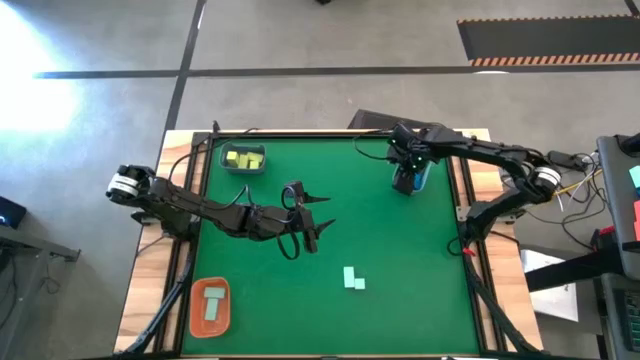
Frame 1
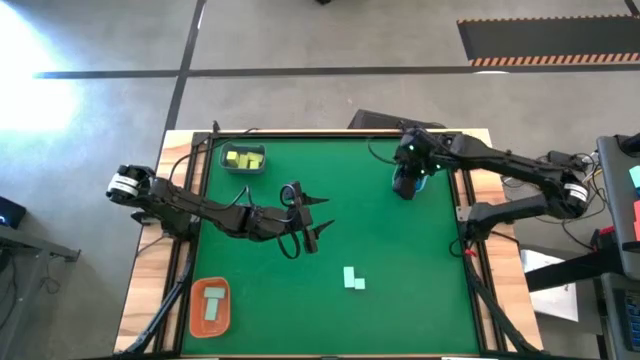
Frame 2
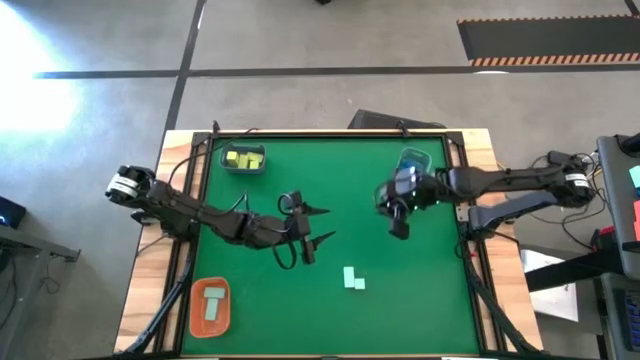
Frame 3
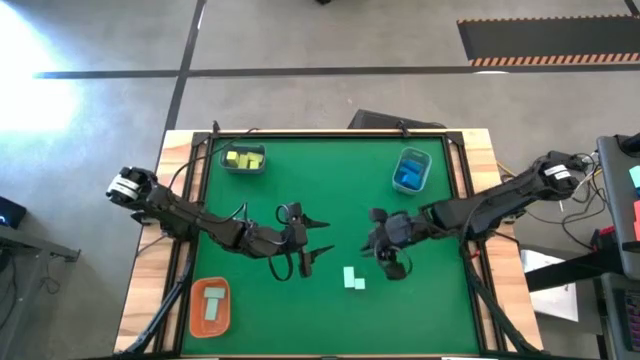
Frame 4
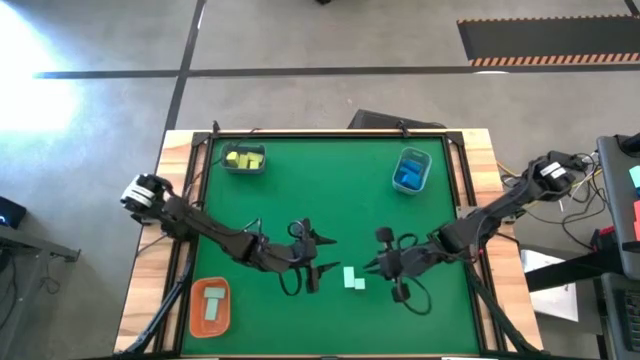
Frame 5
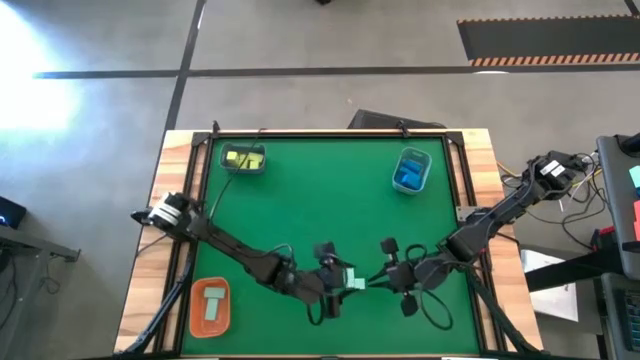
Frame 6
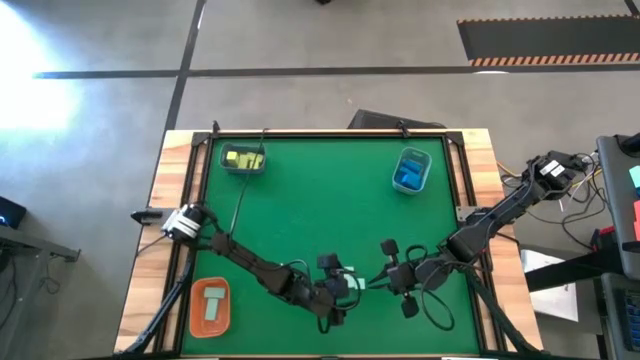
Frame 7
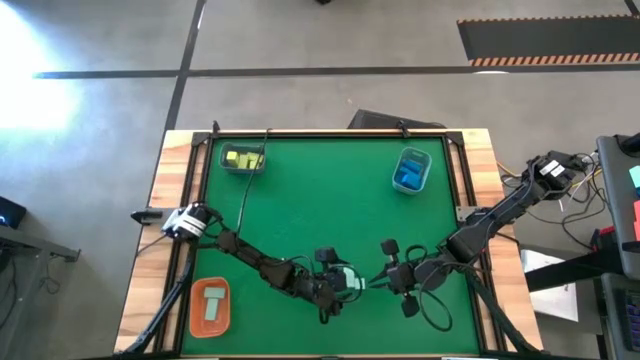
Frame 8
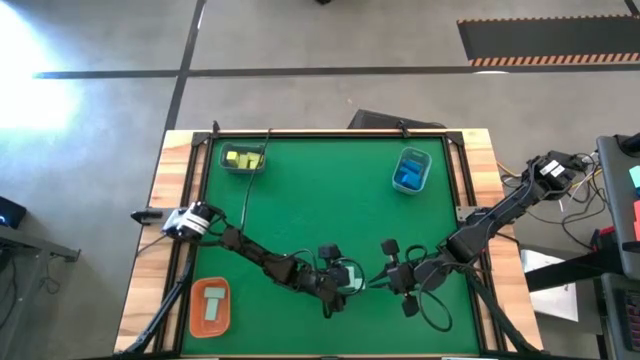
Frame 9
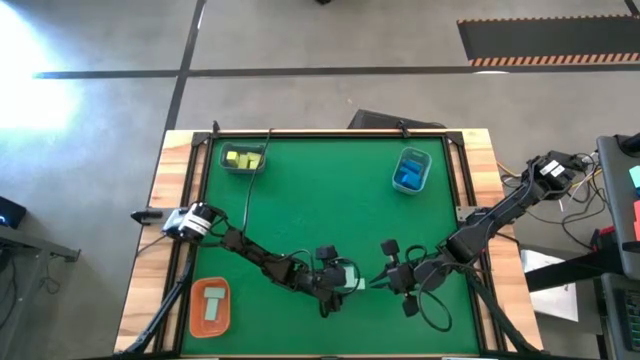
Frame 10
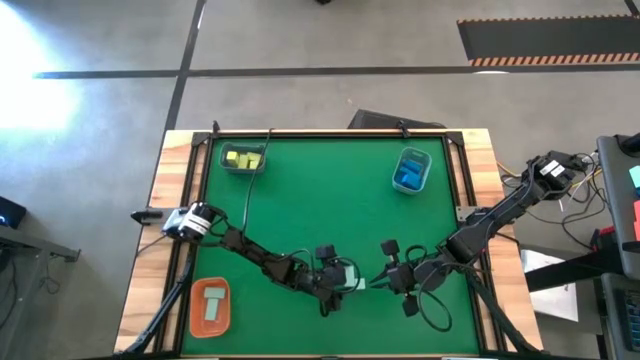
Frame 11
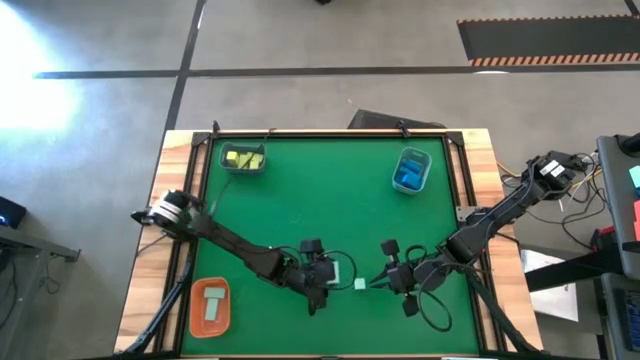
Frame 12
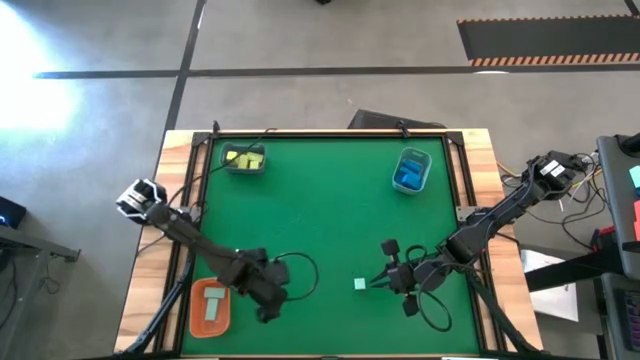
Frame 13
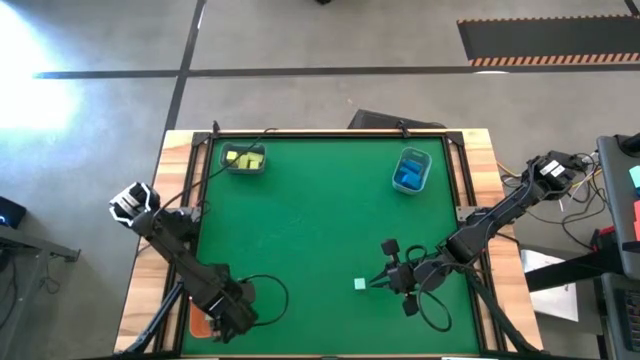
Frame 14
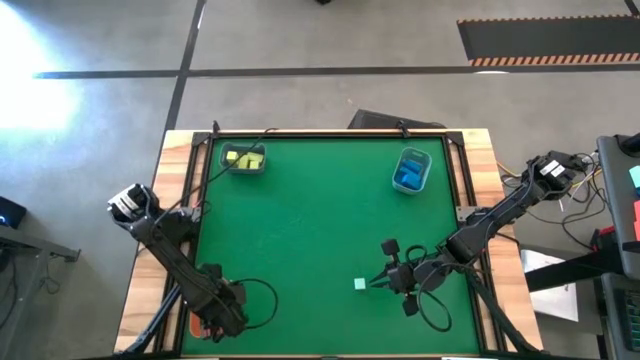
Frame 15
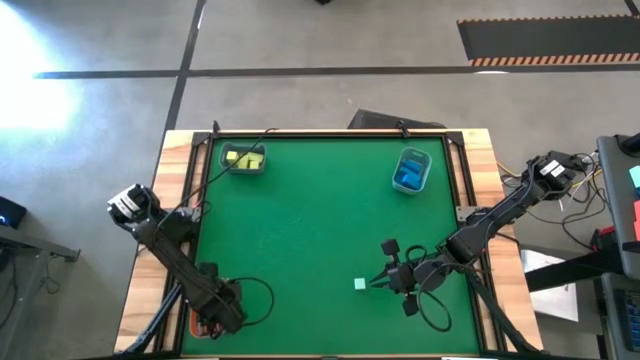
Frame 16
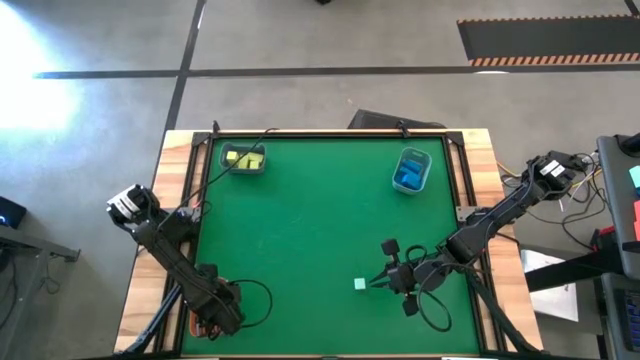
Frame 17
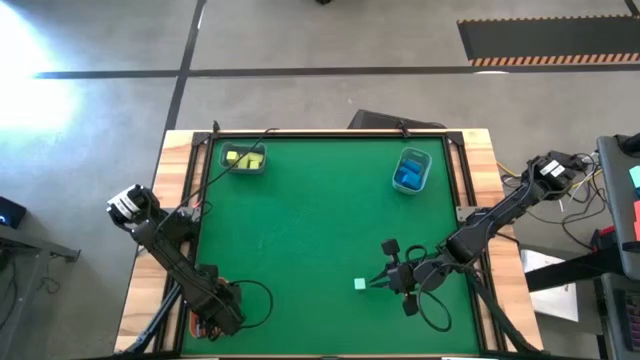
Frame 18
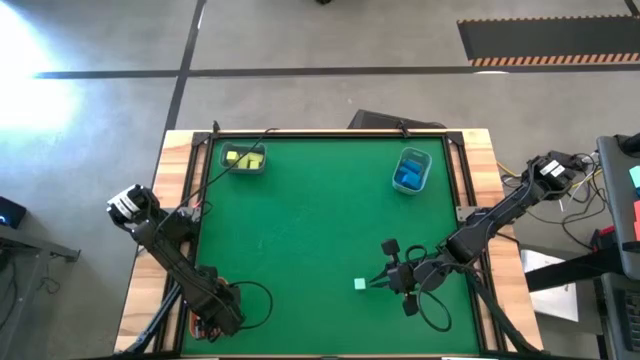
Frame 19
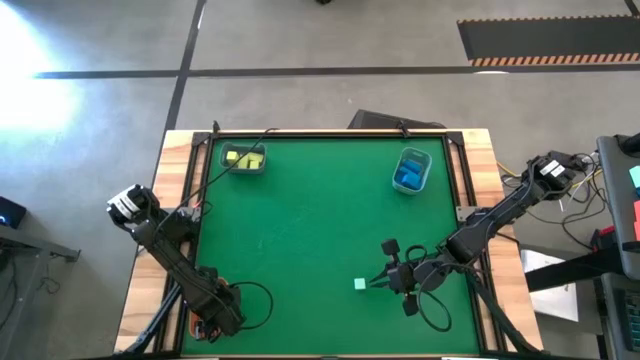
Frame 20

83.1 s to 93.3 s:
Task: Sort & place blocks by color
Put the light blue block into the orange bin

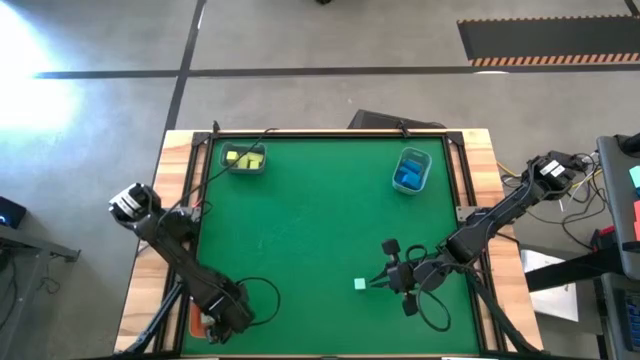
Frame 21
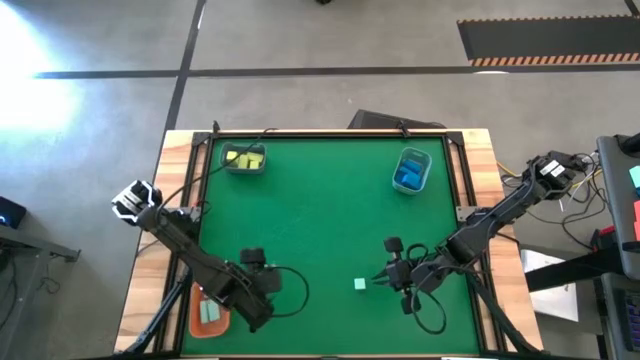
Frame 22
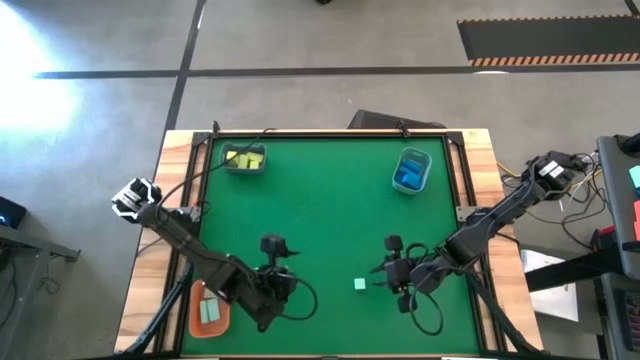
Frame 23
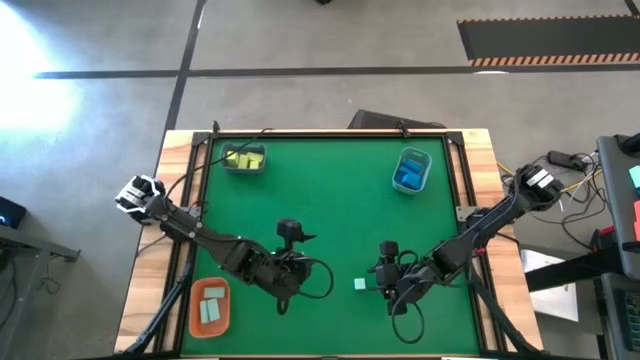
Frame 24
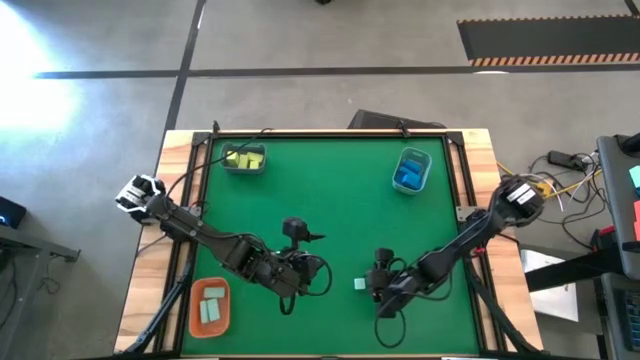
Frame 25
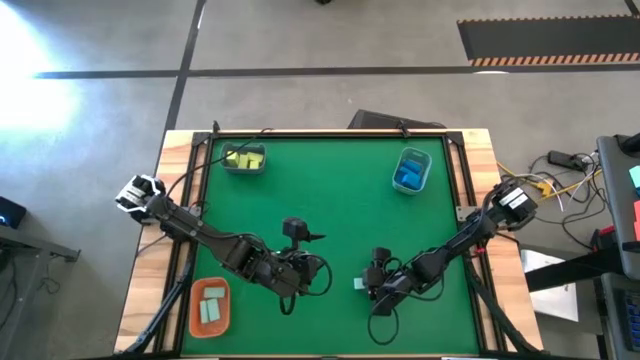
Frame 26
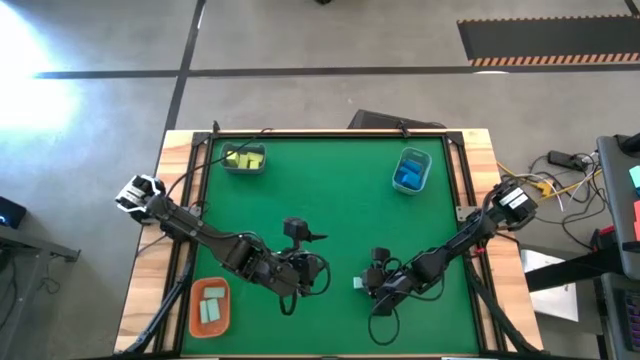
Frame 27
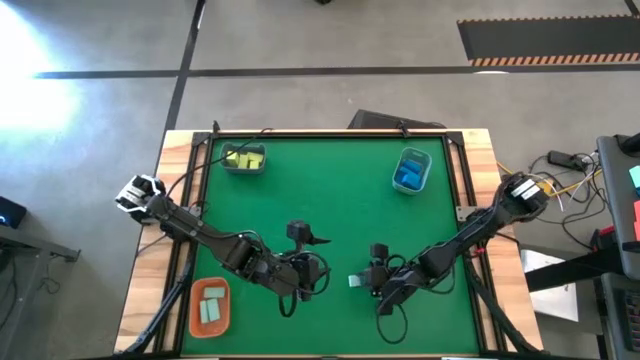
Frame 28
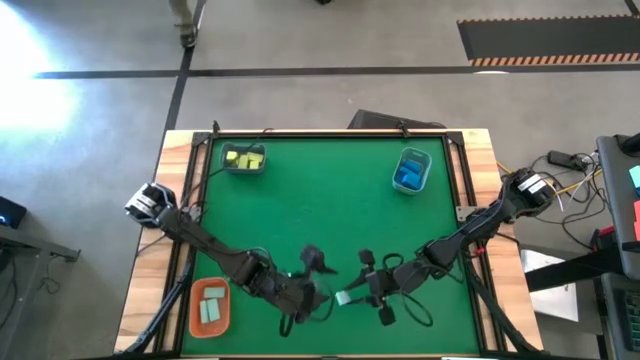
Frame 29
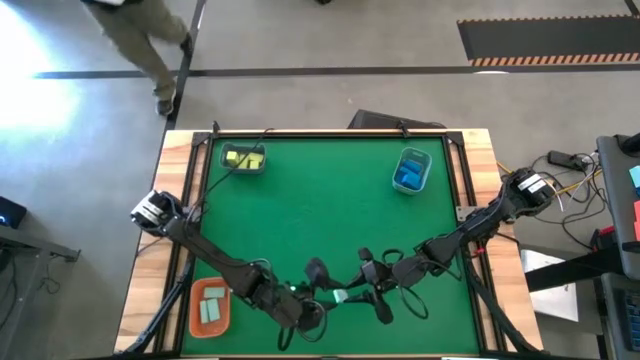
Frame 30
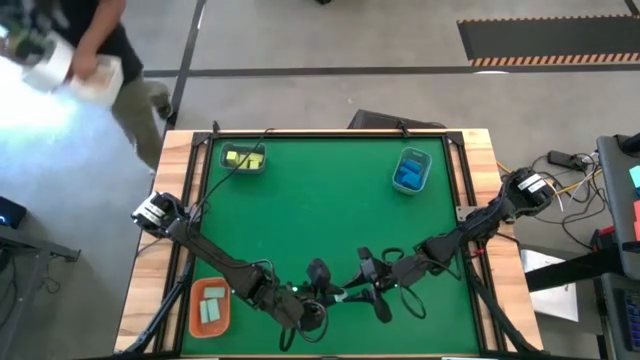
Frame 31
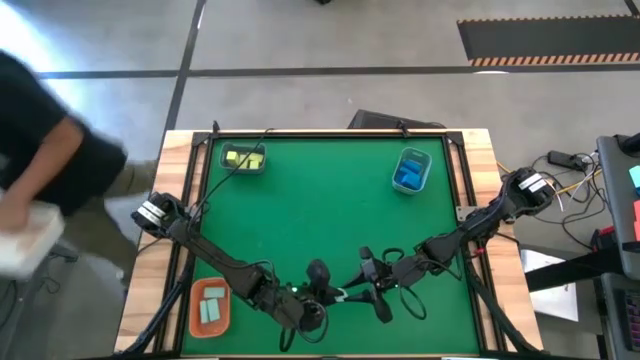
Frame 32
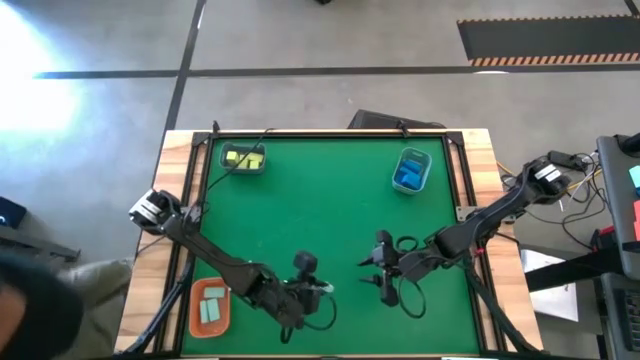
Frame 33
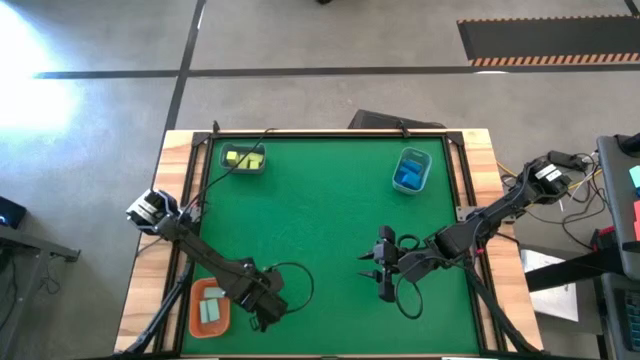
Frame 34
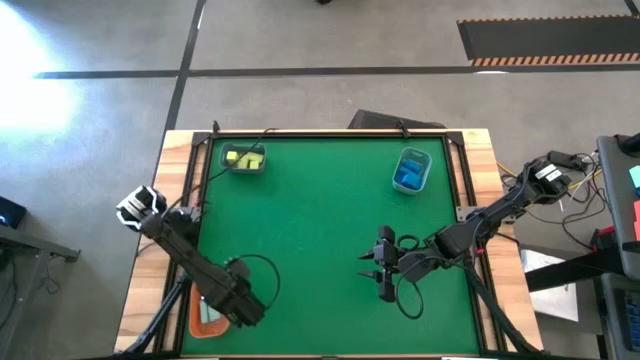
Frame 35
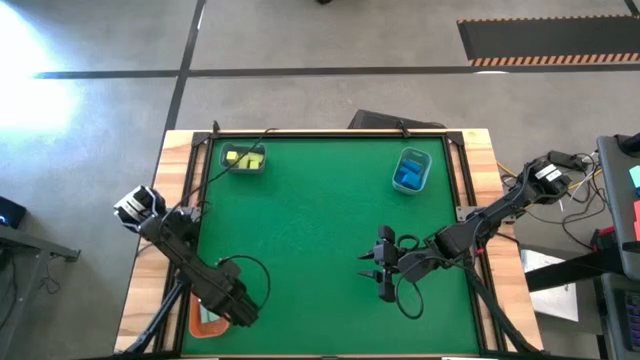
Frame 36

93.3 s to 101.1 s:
Put the light blue block into the orange bin

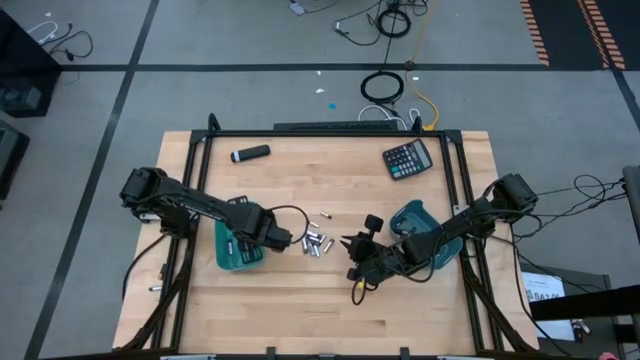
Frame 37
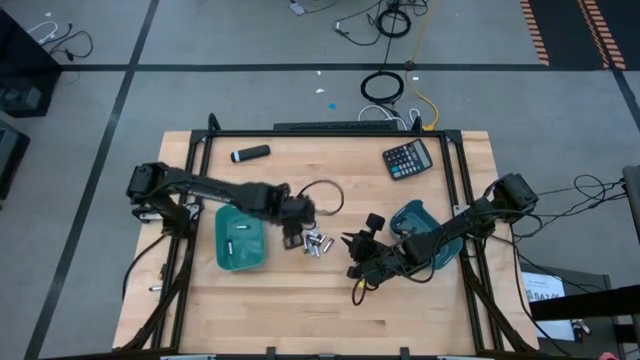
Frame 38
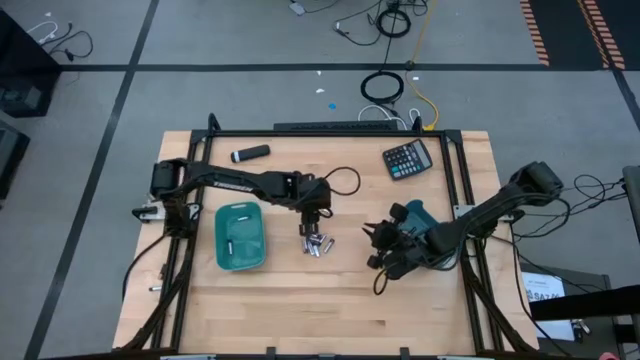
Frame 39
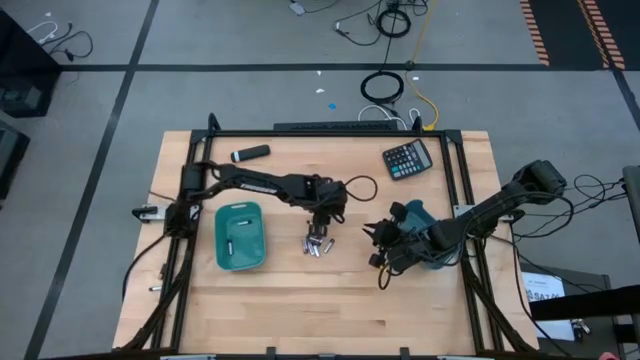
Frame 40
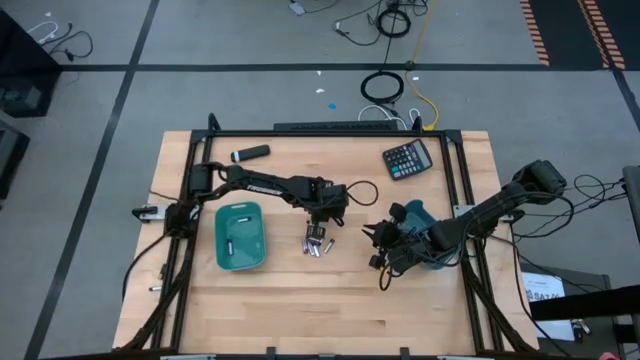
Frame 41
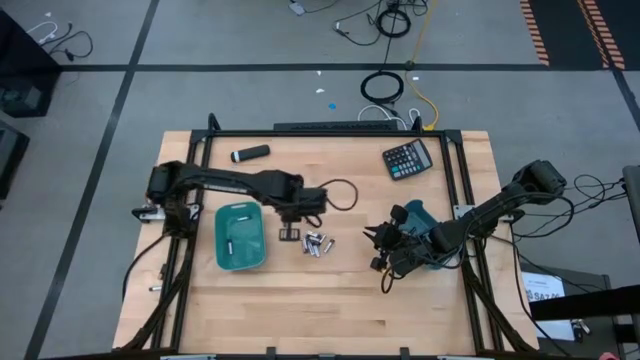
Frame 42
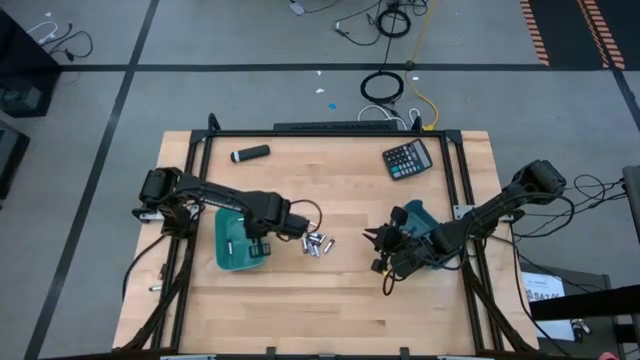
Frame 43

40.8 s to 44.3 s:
Task: Sort batteries
Put the silver battery into the light blue bin
